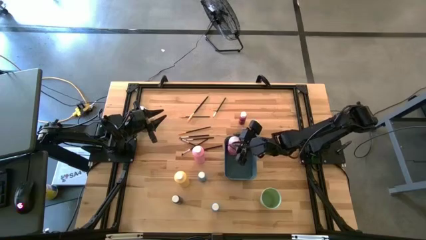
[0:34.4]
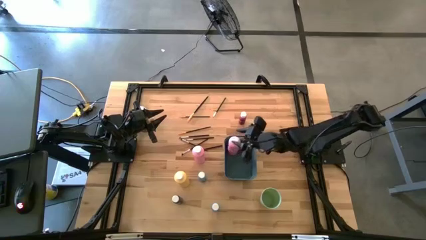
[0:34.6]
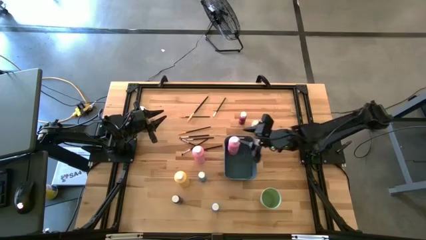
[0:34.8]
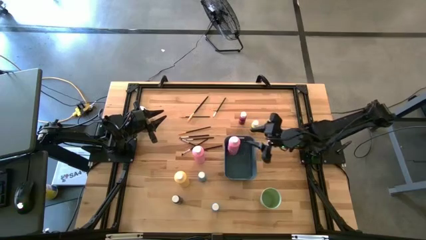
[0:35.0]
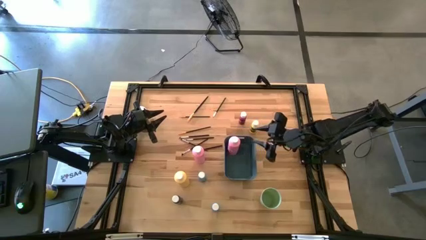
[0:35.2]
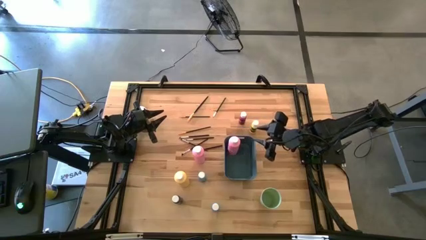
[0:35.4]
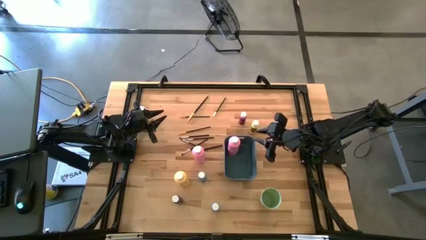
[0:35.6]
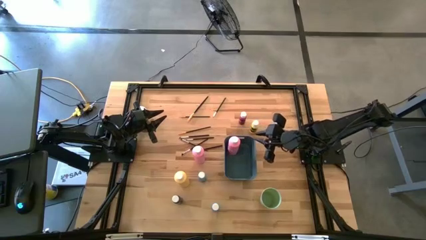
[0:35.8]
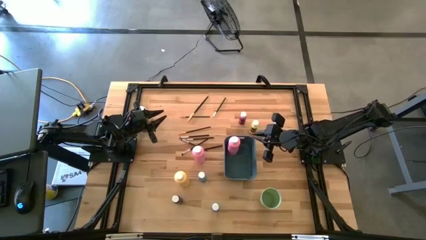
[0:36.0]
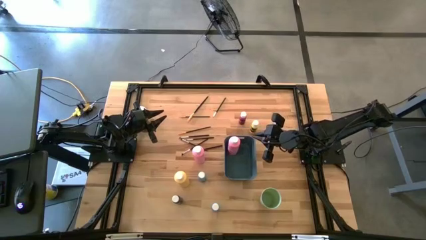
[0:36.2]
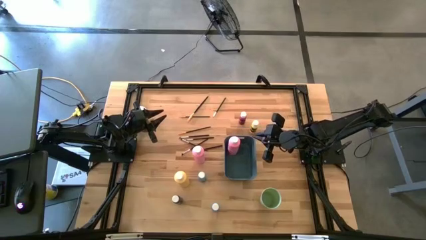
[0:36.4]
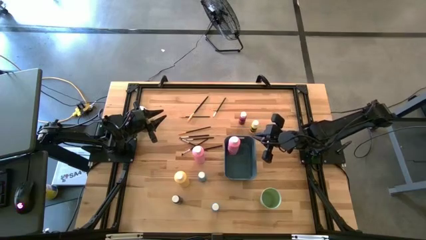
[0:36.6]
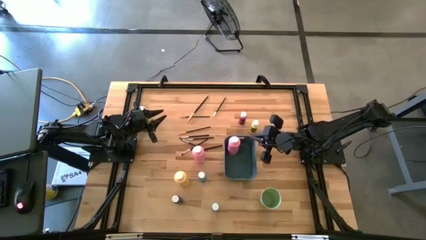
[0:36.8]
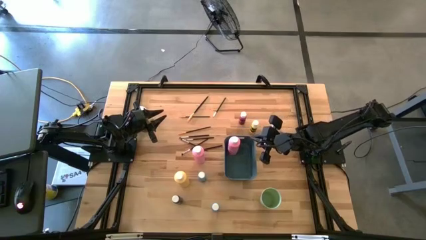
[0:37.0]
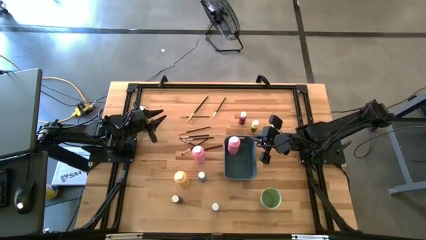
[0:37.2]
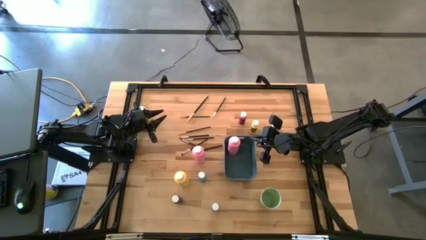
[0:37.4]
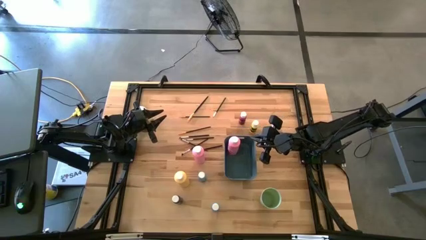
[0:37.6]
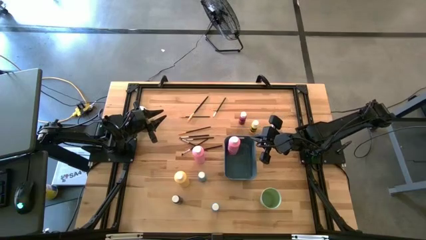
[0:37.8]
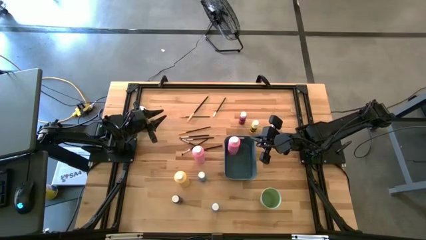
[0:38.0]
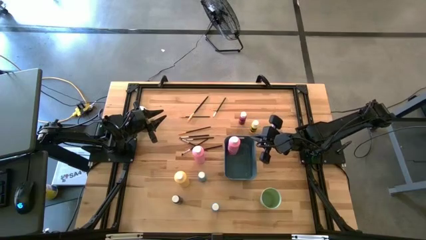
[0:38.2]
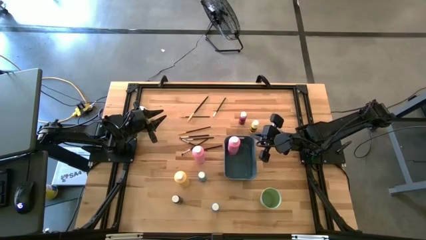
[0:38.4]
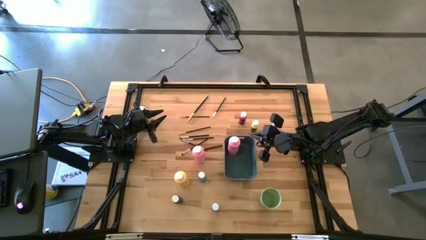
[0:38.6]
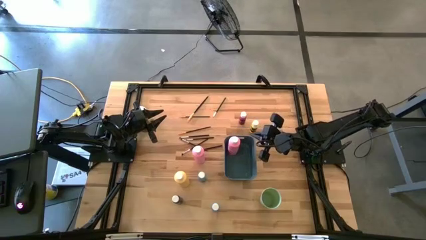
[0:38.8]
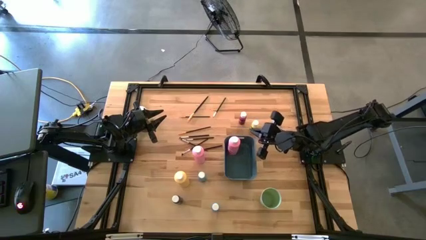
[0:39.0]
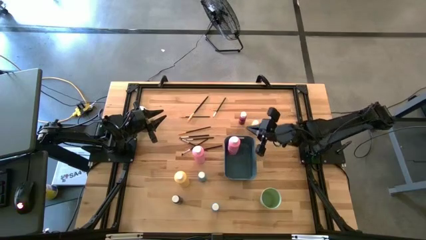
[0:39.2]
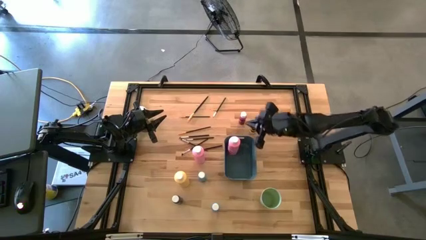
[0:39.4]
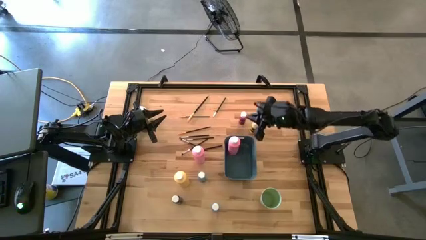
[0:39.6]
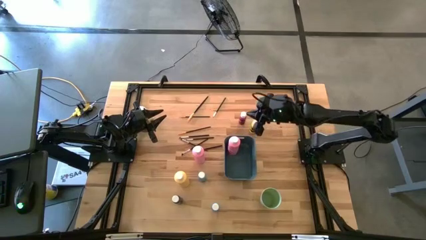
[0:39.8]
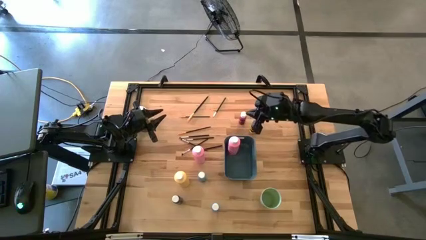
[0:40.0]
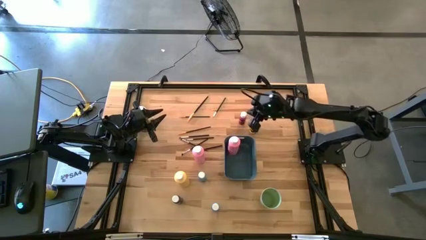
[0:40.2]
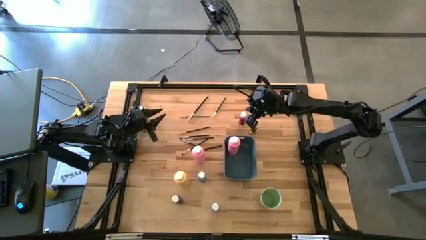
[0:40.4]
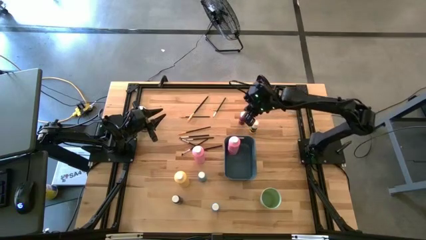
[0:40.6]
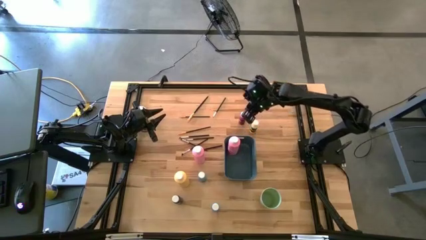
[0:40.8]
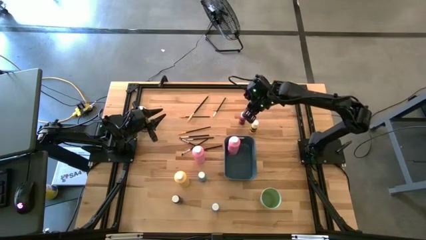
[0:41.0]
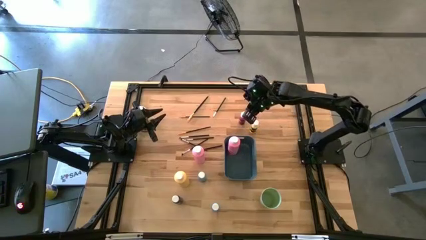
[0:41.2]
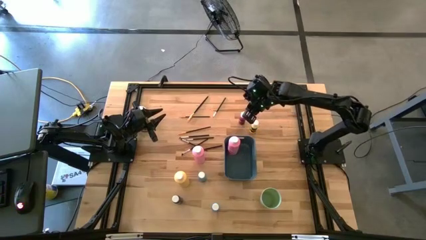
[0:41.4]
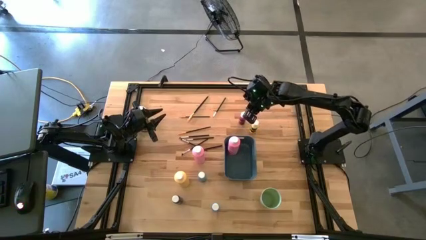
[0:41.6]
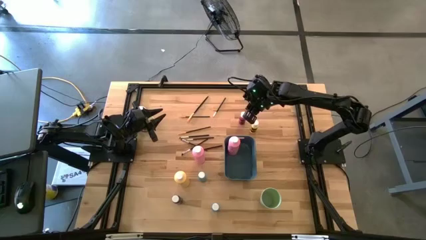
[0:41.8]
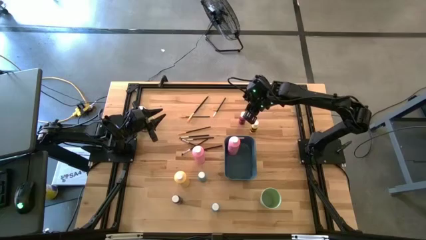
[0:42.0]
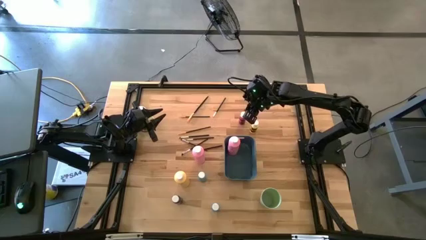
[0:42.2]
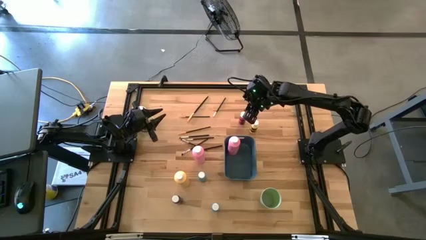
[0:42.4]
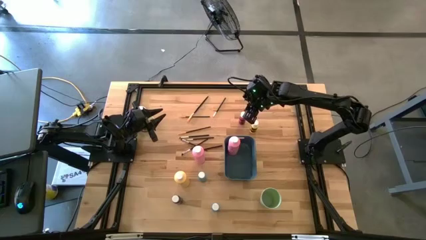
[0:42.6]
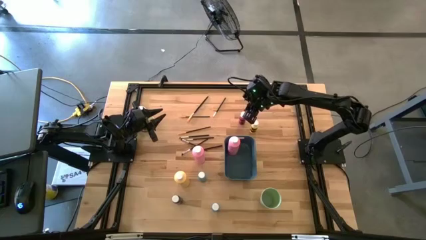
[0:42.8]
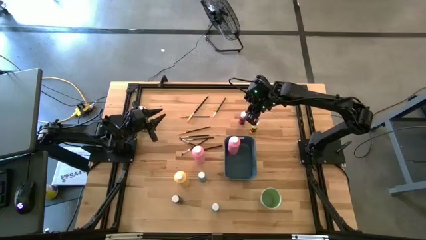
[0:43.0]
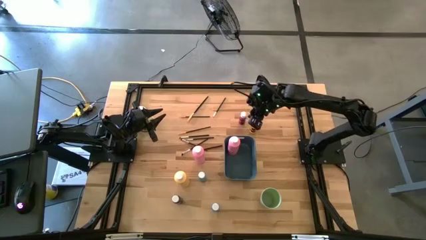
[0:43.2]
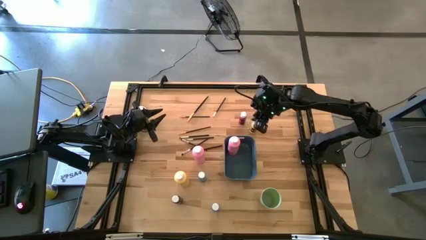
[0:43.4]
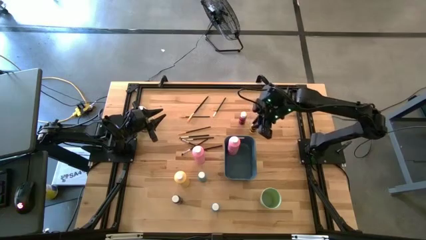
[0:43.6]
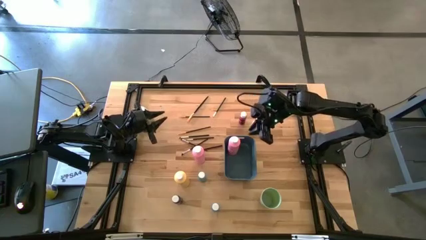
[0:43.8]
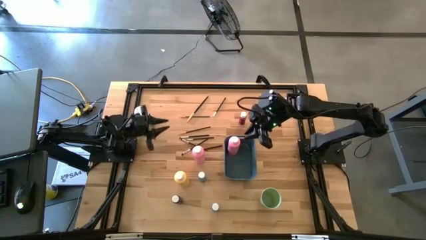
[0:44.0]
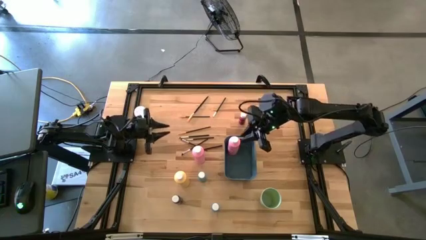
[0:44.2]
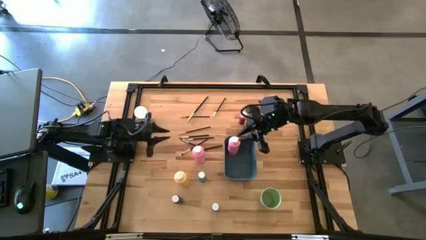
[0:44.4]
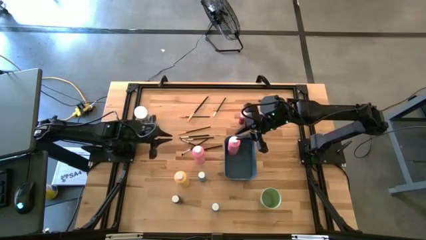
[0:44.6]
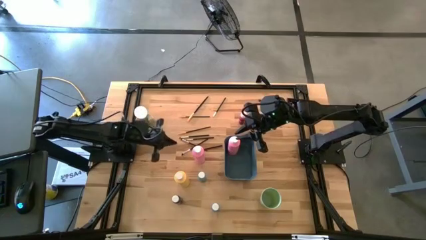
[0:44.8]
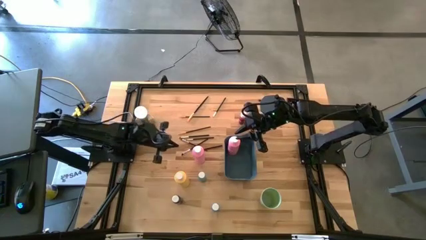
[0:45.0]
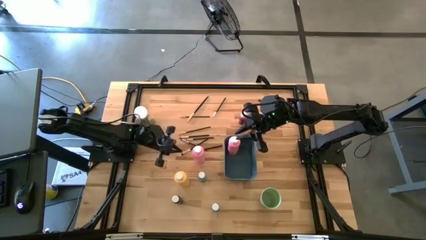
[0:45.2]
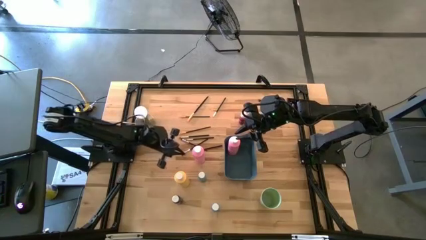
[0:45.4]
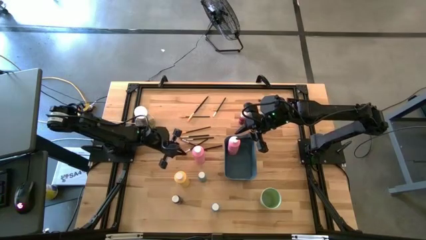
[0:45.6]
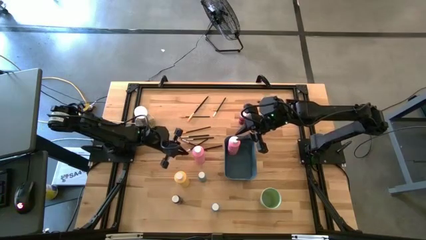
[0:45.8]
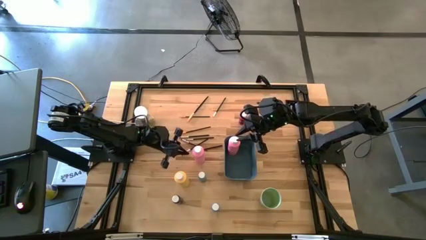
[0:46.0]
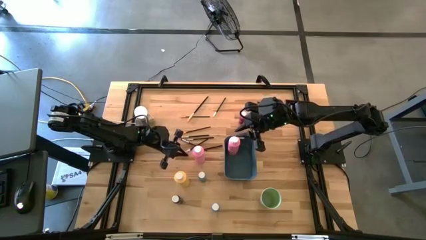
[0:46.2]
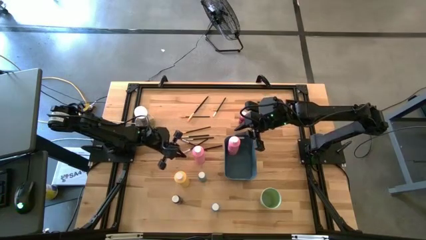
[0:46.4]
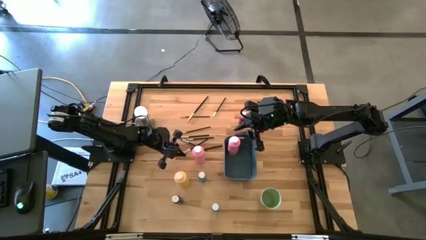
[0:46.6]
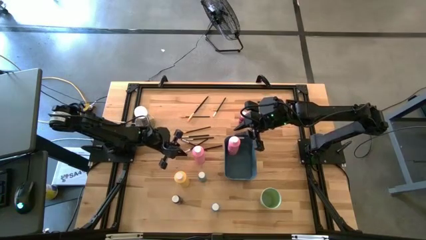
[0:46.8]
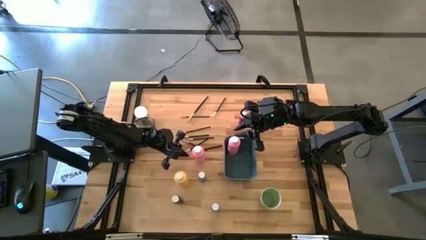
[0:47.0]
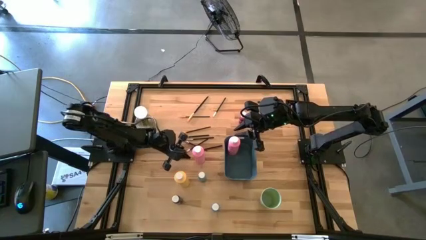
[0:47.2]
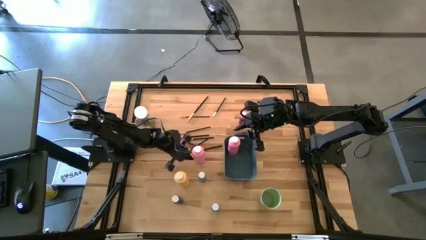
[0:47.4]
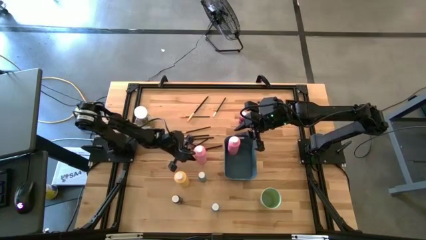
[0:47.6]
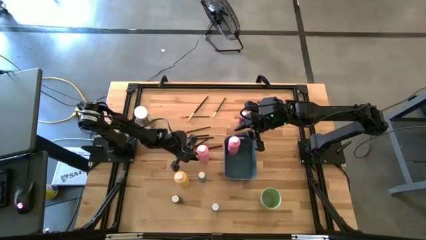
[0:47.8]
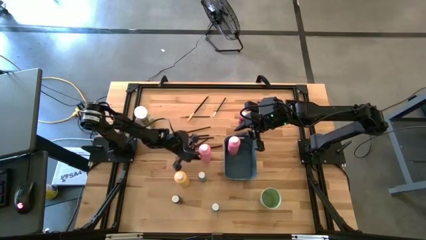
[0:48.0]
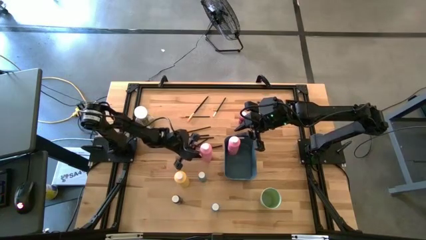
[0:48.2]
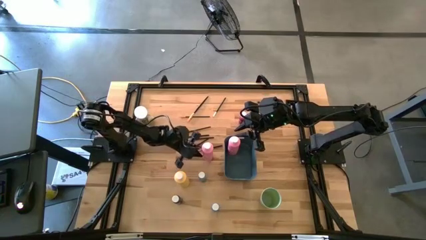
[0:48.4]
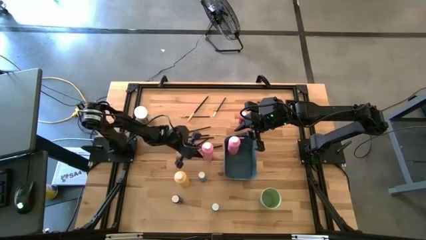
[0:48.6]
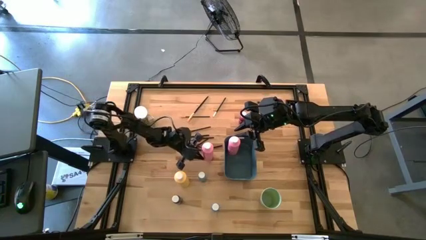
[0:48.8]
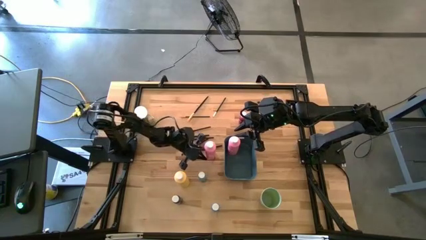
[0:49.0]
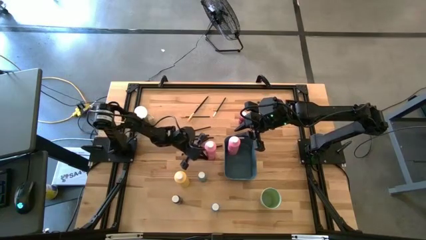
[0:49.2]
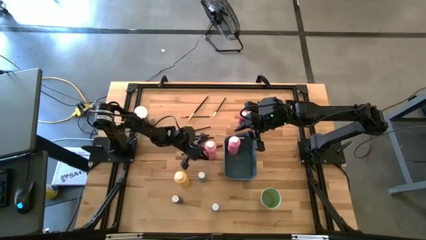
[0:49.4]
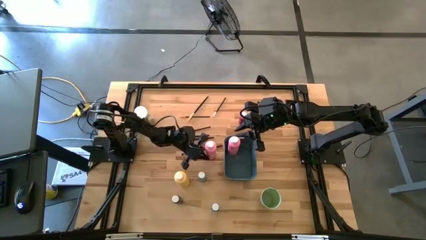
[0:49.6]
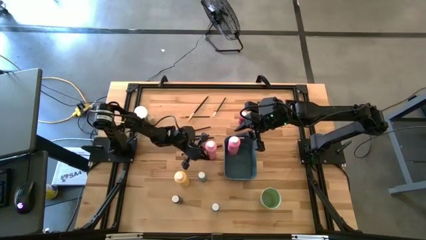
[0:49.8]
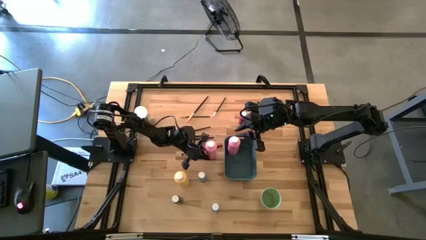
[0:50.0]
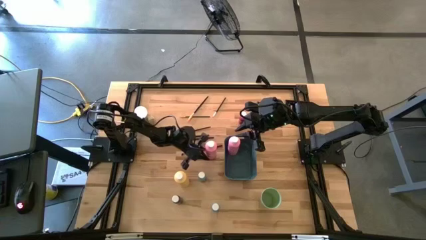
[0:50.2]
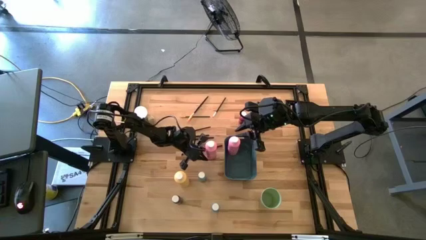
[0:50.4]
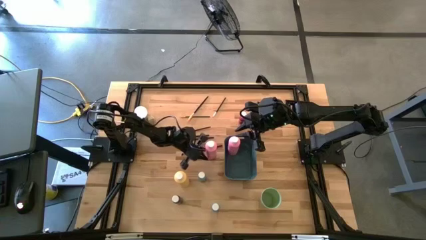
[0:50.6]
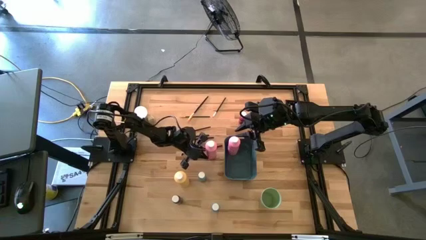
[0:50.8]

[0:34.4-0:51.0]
Task: Pick & Place Paint Supplies
Put the large pink paint bottle into the blue bin
